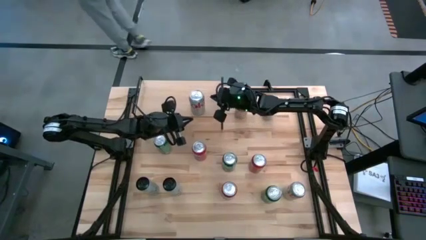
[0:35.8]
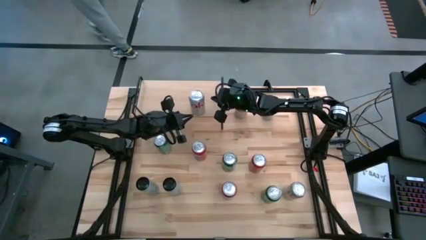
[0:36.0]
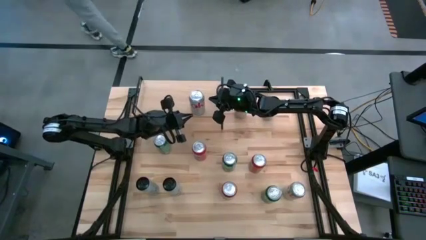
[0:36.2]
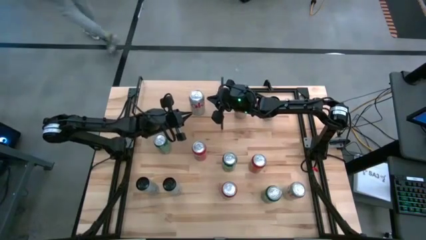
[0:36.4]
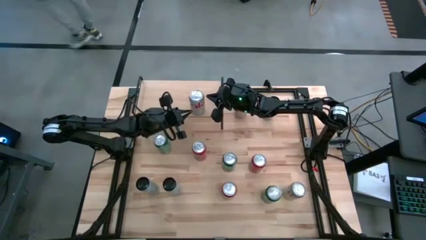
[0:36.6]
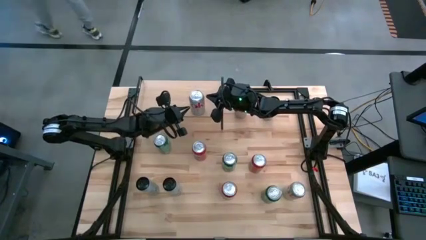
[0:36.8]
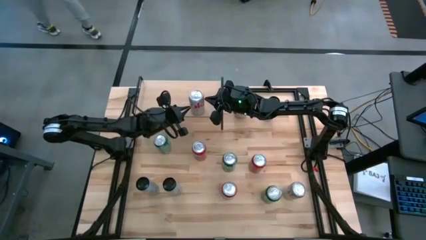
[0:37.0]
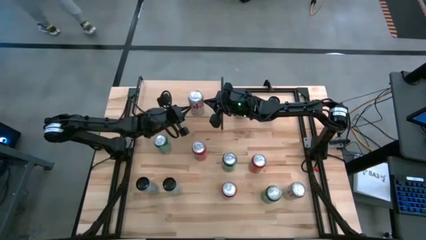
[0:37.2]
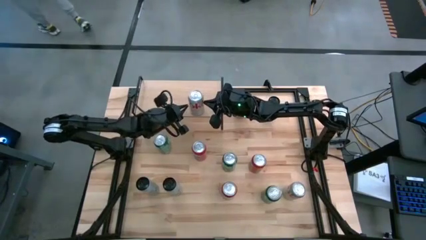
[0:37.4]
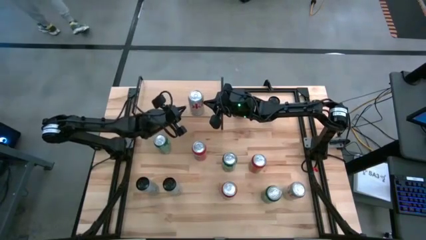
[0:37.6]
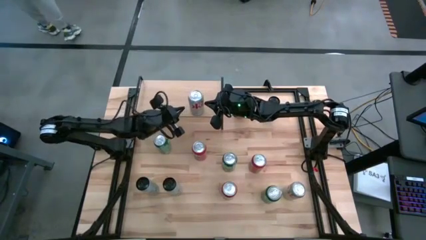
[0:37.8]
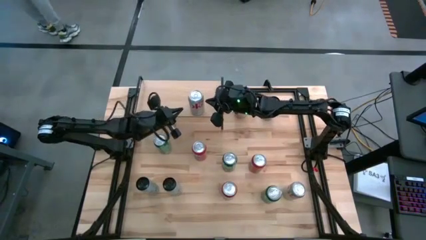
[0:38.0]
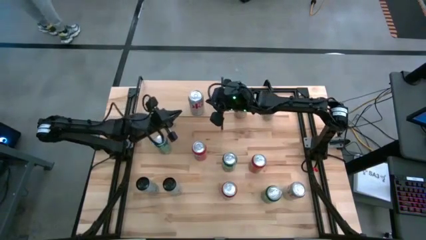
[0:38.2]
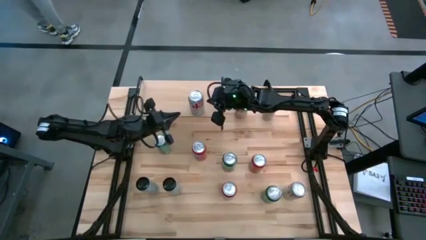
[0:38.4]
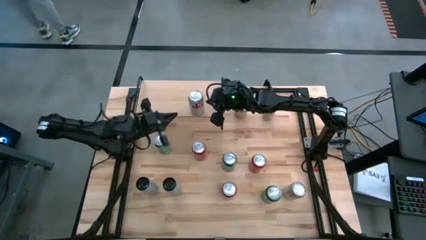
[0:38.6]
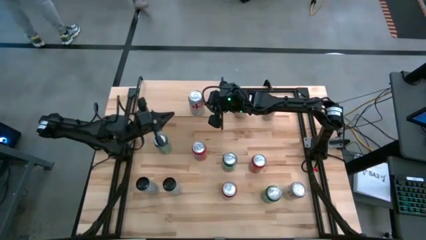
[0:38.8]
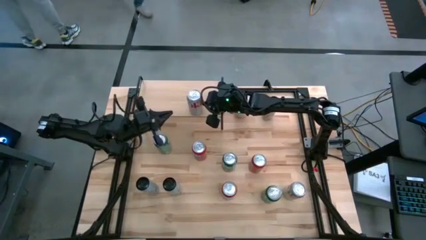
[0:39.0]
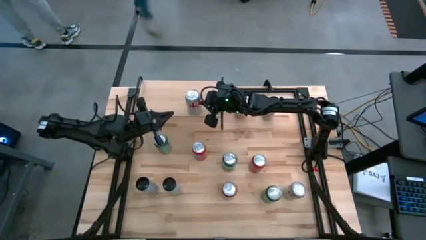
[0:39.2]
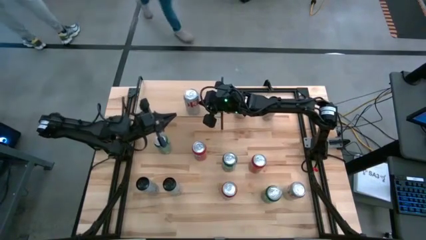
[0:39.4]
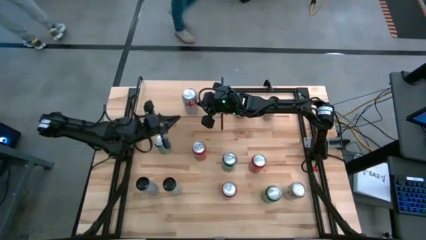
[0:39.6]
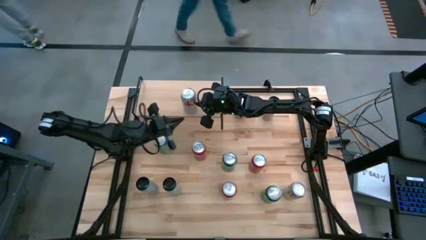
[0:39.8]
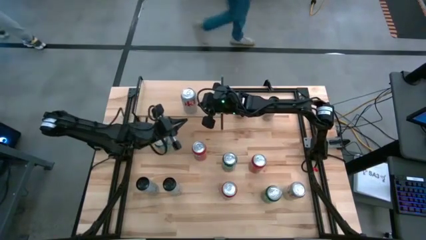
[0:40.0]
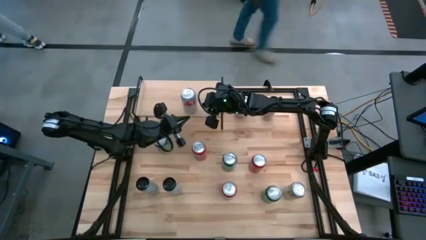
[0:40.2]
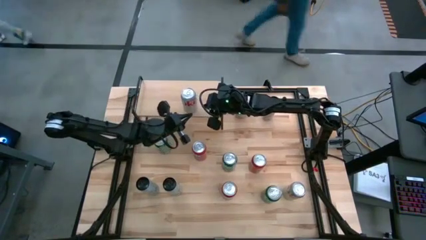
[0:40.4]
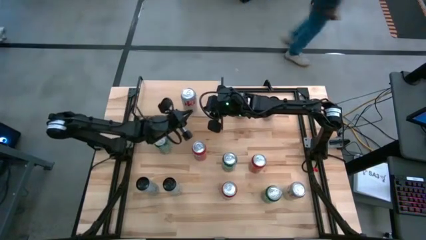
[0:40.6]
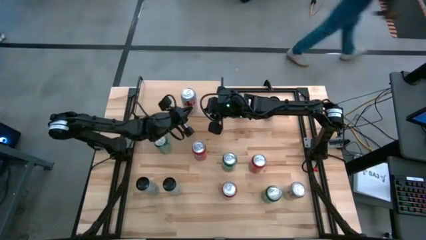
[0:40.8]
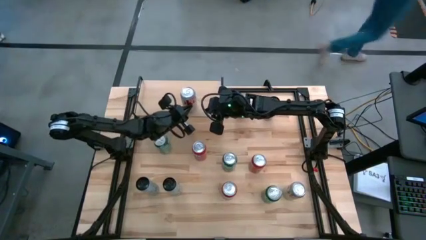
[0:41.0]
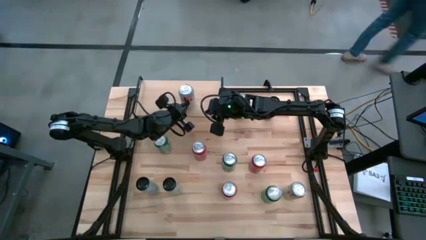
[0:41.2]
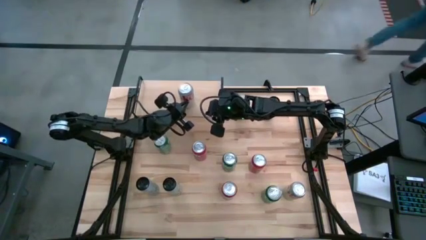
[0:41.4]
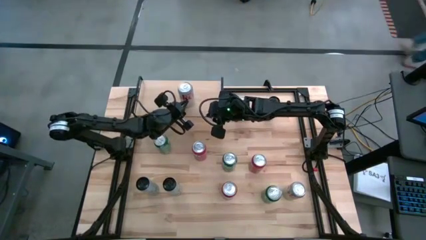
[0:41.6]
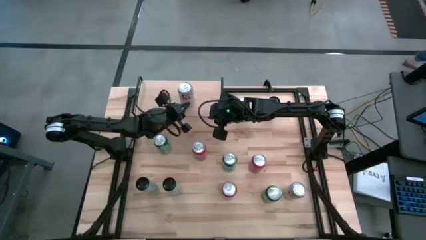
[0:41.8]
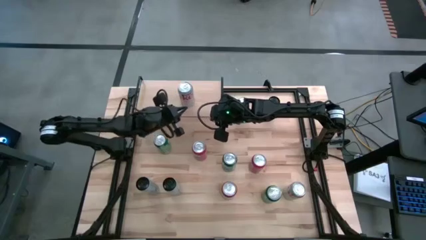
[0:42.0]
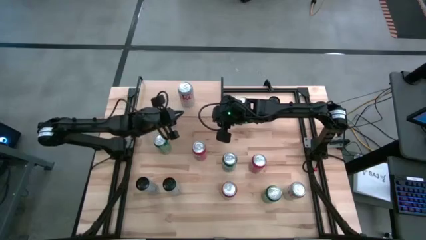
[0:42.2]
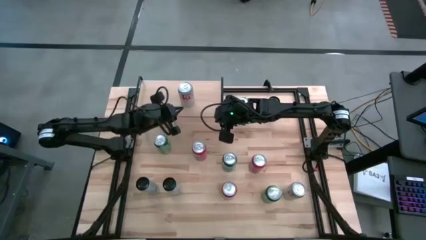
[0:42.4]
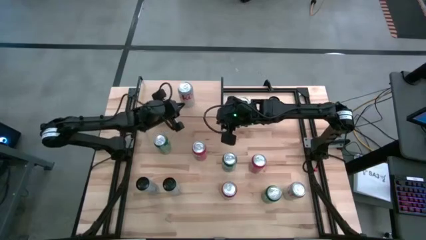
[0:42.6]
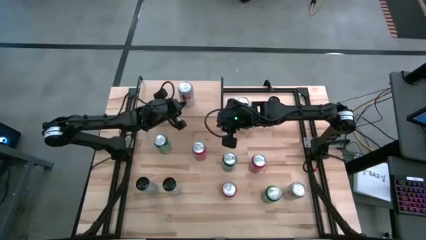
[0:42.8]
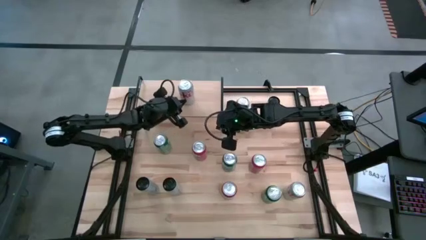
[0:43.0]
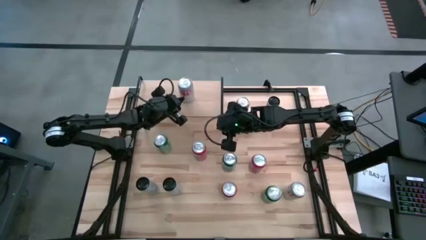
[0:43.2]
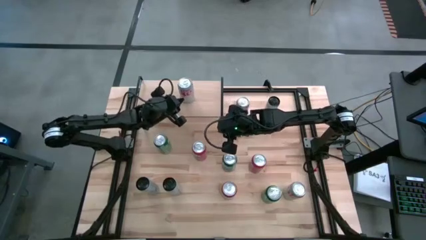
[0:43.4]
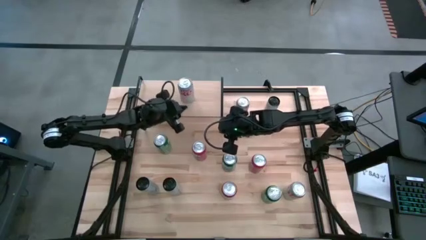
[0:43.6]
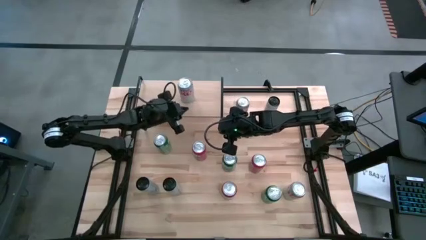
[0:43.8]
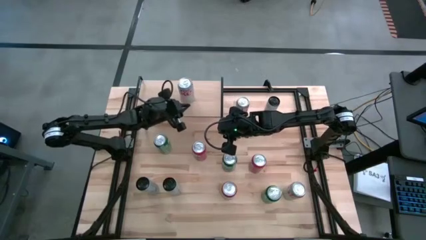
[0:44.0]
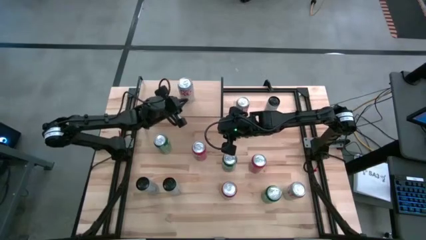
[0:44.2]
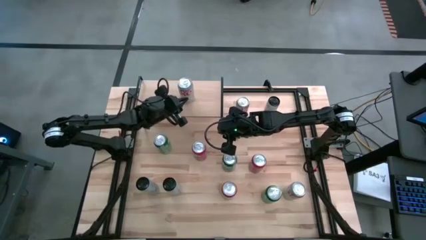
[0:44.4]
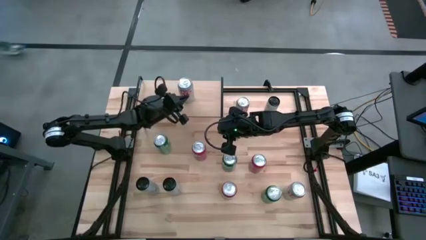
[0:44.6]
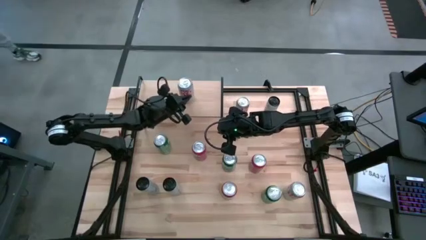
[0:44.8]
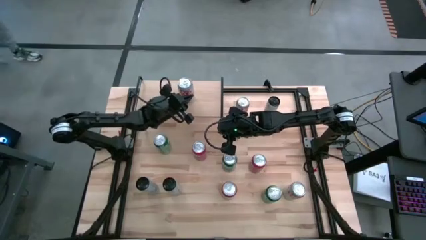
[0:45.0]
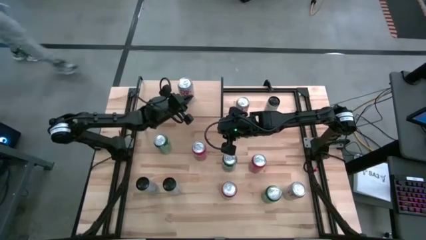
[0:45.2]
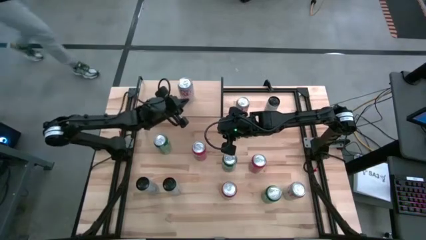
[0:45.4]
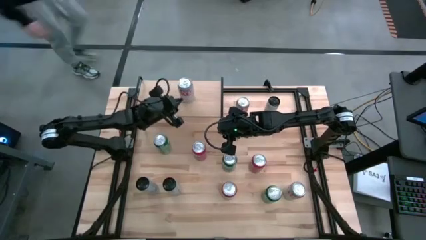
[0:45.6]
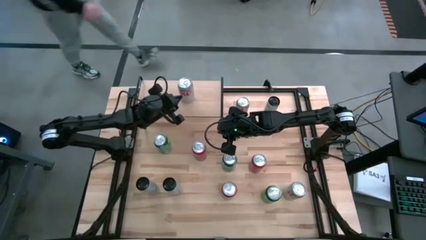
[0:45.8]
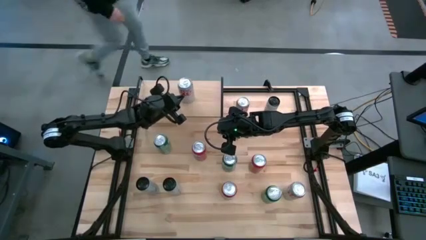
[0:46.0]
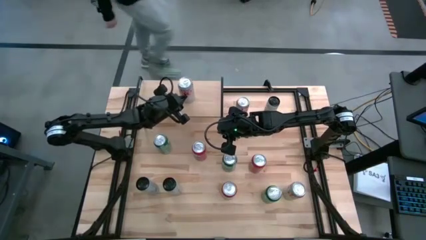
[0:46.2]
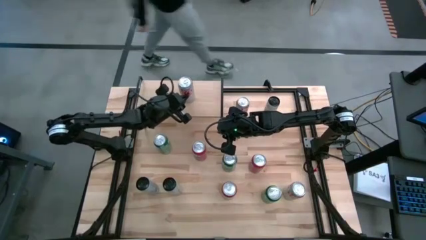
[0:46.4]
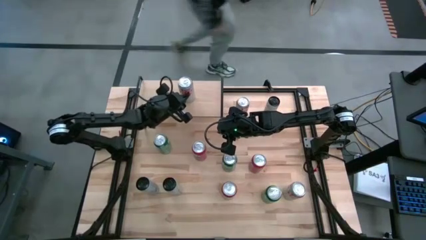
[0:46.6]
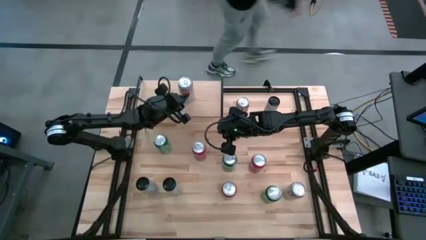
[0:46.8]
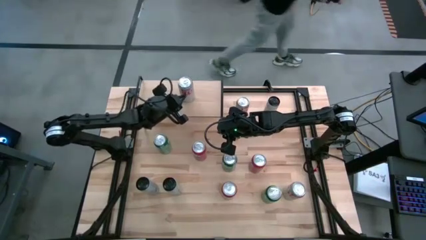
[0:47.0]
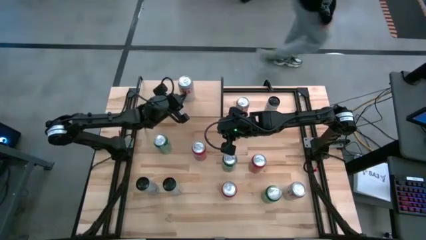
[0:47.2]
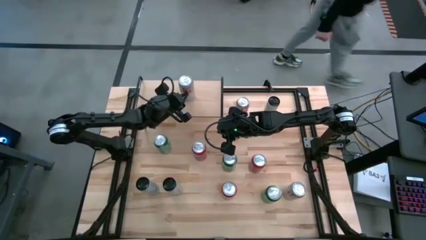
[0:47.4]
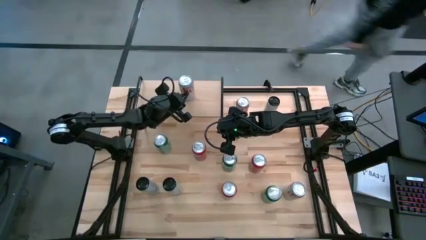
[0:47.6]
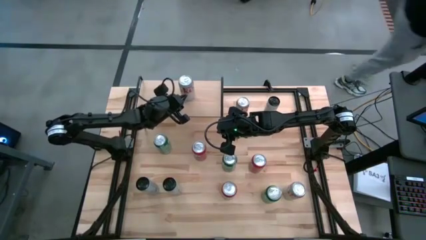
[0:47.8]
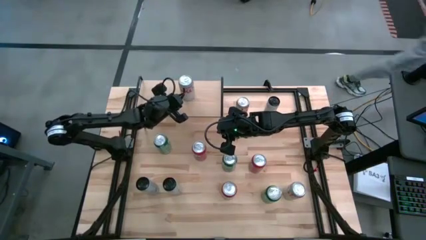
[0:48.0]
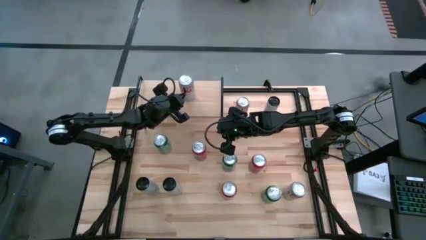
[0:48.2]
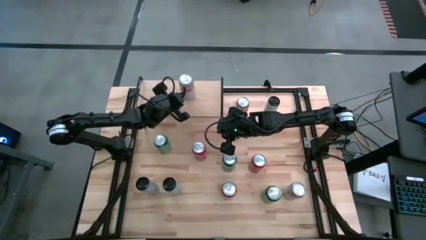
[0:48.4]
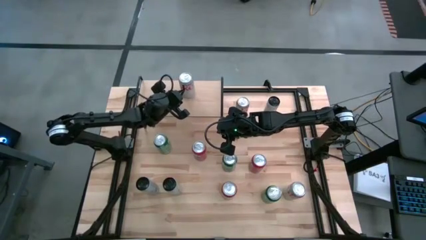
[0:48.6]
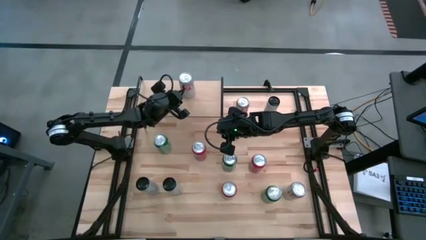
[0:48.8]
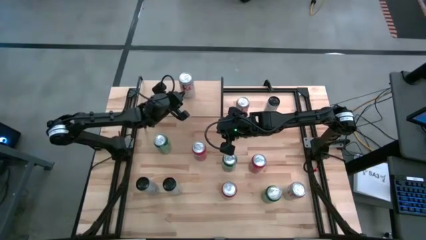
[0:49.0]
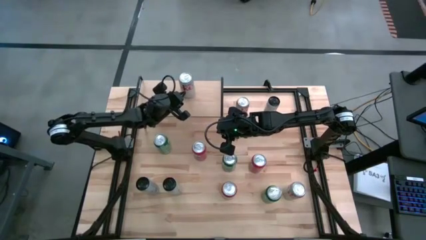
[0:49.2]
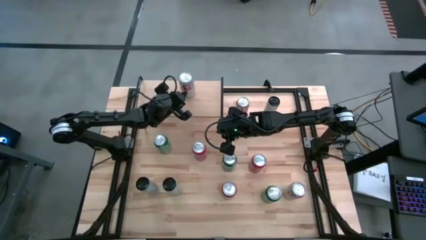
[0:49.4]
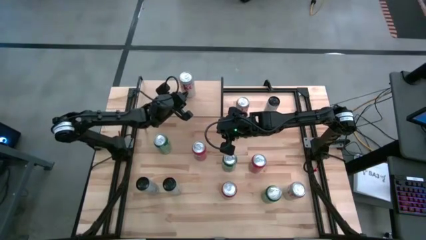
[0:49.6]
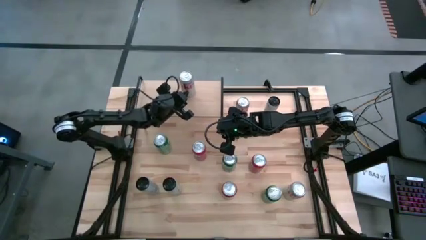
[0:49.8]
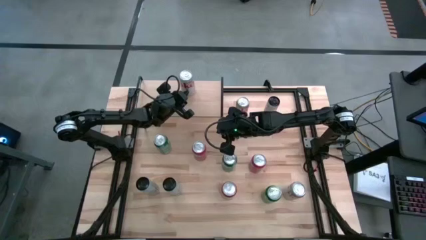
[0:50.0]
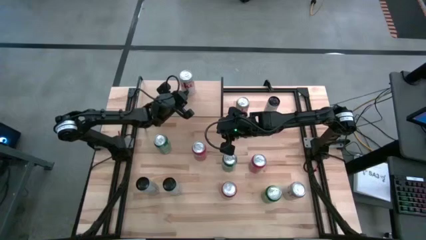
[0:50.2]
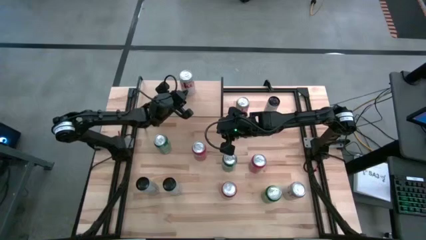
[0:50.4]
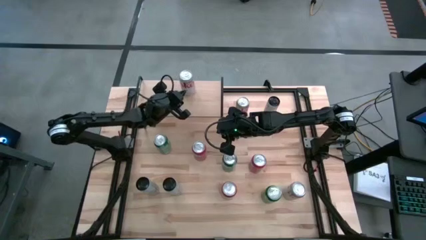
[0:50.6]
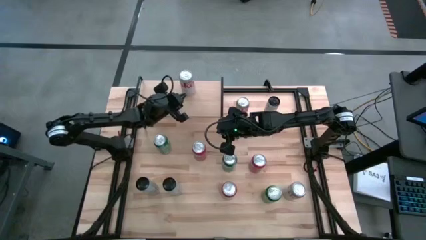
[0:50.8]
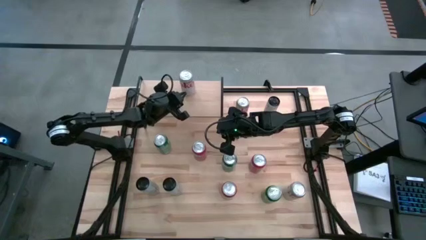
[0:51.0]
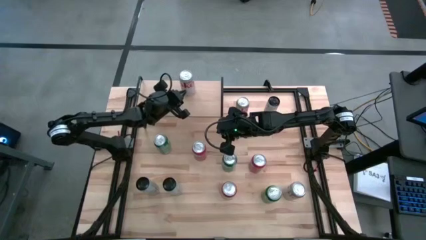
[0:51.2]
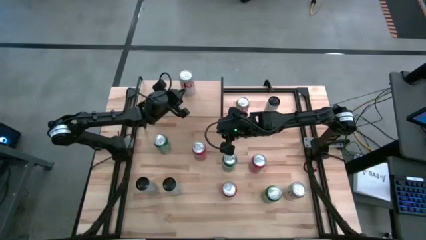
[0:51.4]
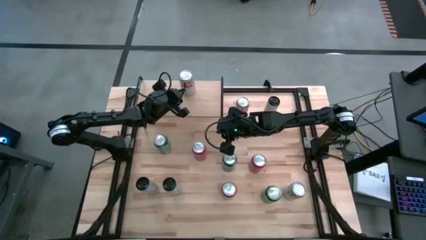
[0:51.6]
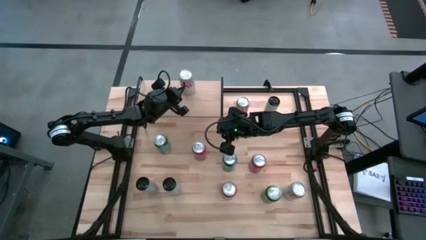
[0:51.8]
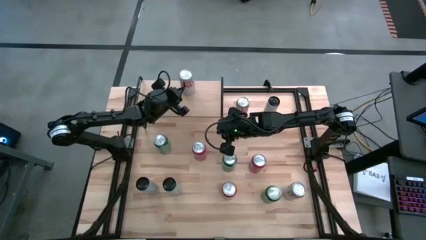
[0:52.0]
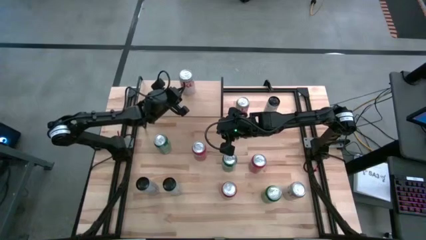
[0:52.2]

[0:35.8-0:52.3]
Task: Place canned beverage on shelf
Put the middle silver soda can on the shelf
